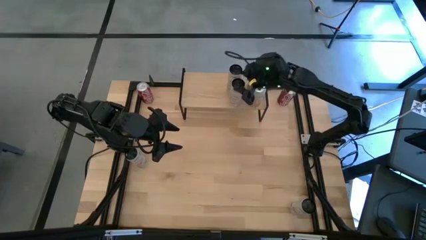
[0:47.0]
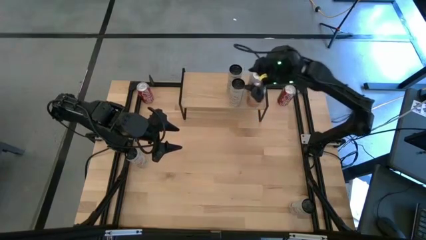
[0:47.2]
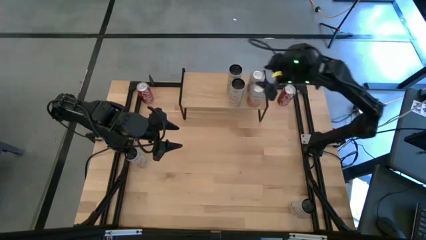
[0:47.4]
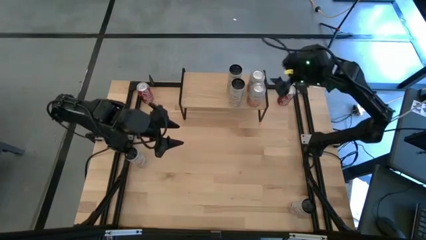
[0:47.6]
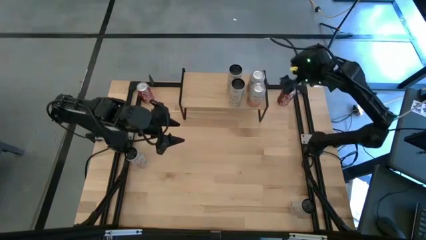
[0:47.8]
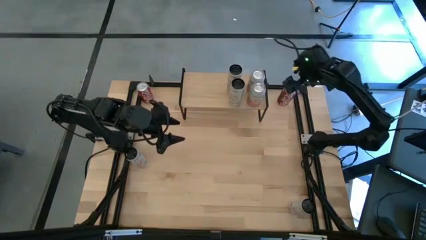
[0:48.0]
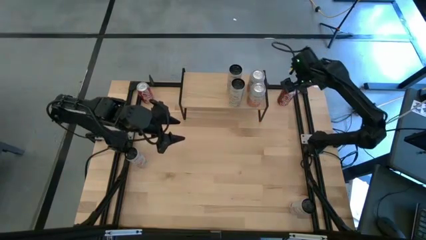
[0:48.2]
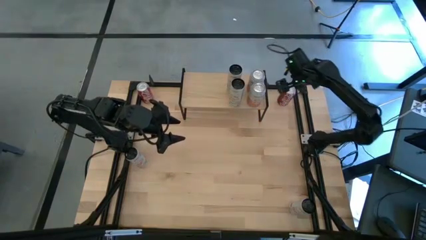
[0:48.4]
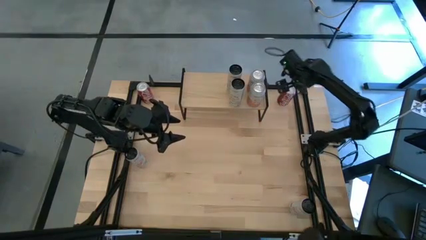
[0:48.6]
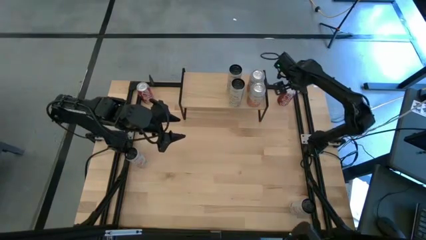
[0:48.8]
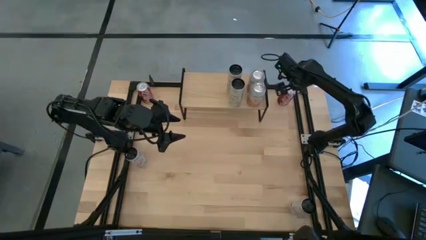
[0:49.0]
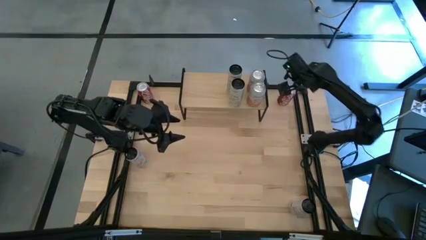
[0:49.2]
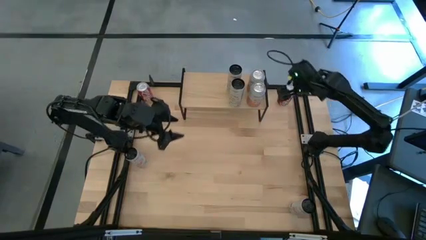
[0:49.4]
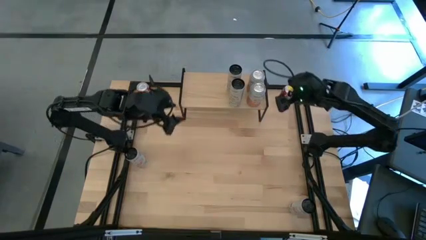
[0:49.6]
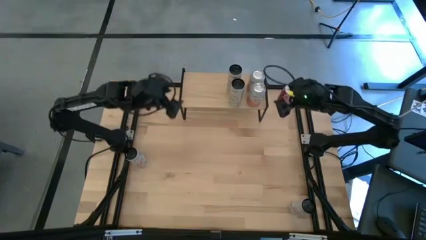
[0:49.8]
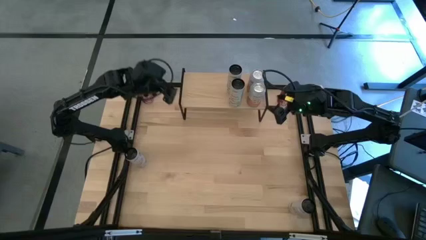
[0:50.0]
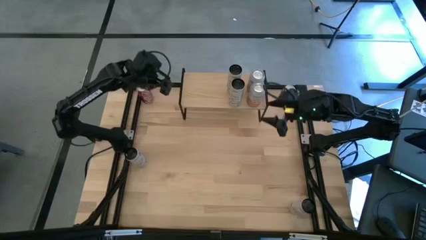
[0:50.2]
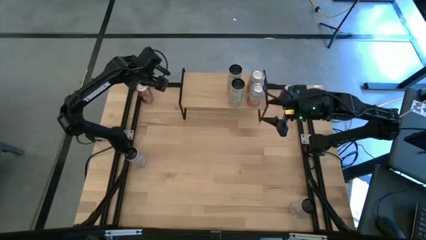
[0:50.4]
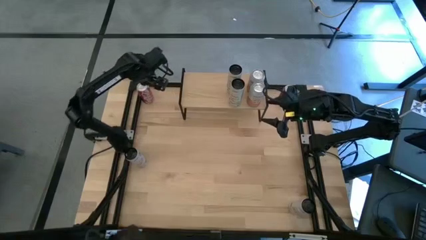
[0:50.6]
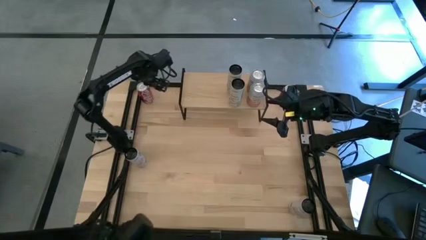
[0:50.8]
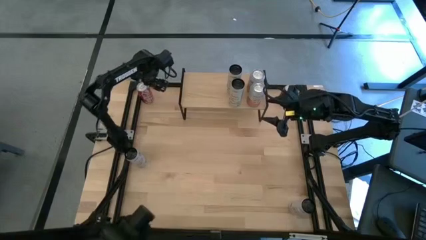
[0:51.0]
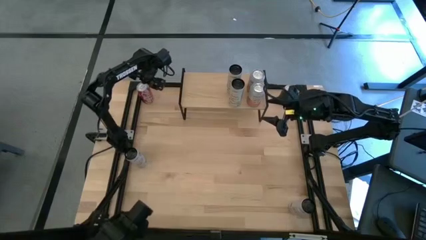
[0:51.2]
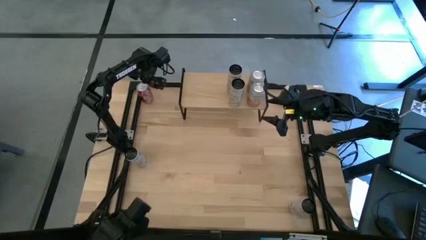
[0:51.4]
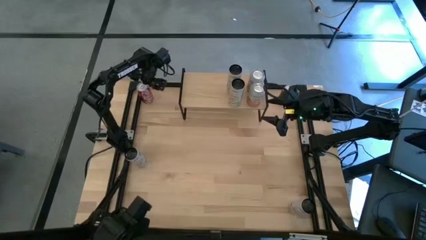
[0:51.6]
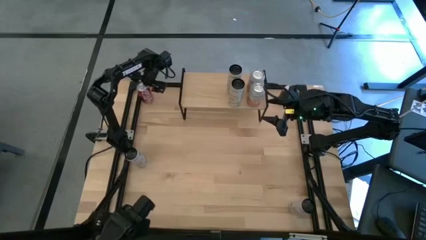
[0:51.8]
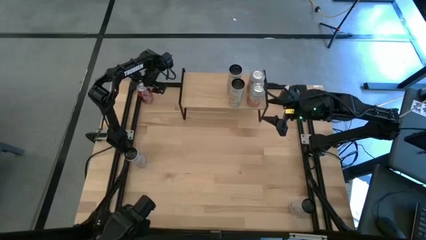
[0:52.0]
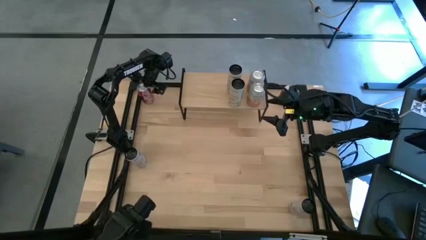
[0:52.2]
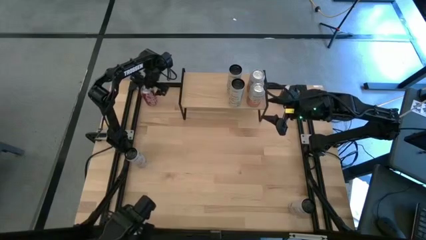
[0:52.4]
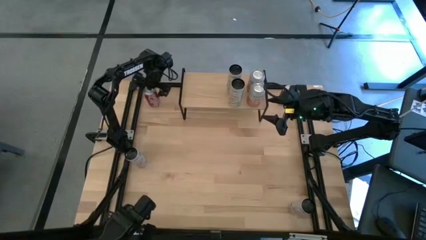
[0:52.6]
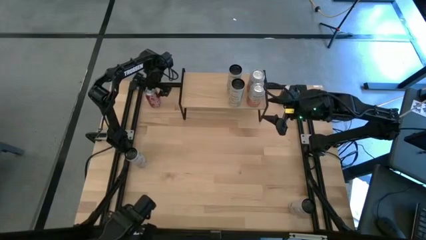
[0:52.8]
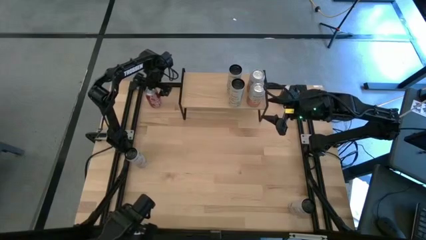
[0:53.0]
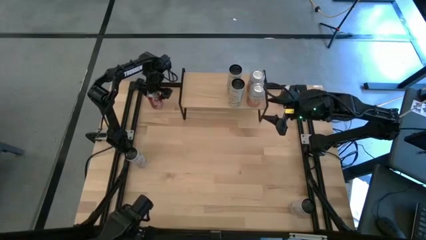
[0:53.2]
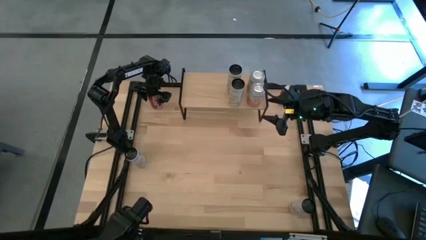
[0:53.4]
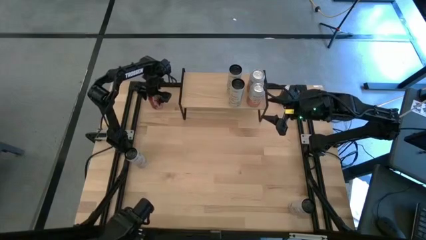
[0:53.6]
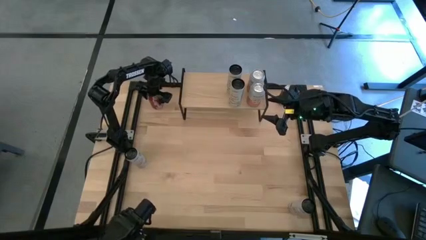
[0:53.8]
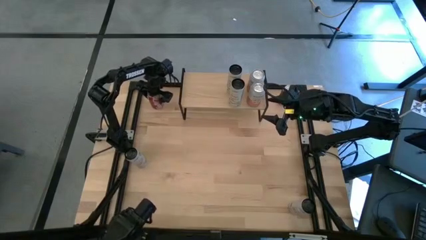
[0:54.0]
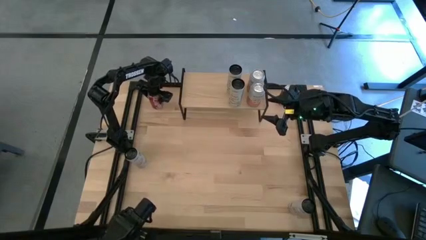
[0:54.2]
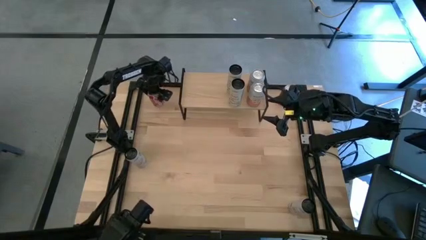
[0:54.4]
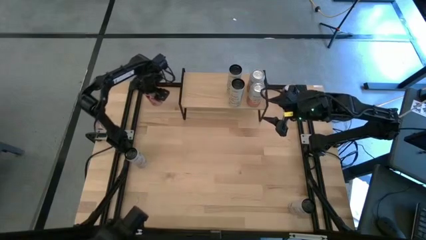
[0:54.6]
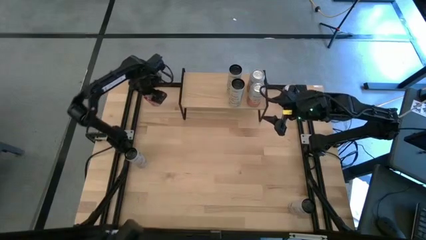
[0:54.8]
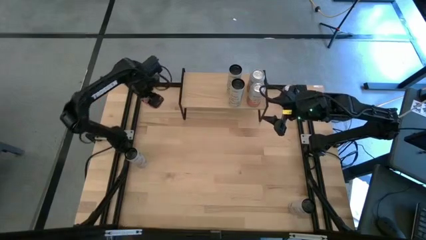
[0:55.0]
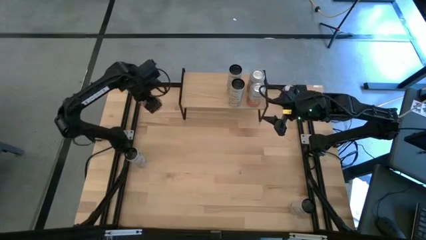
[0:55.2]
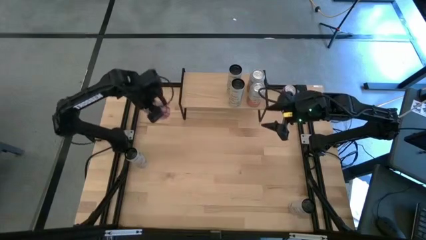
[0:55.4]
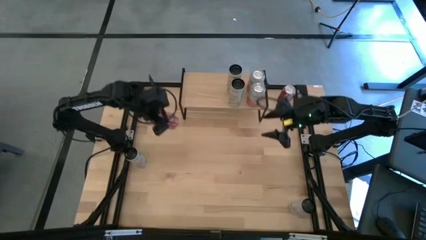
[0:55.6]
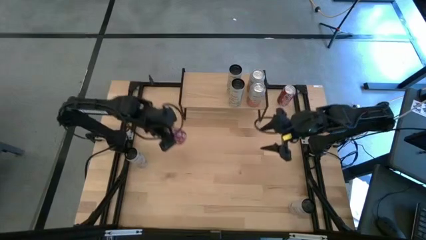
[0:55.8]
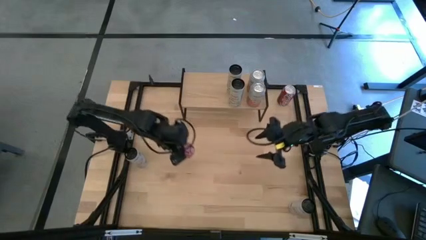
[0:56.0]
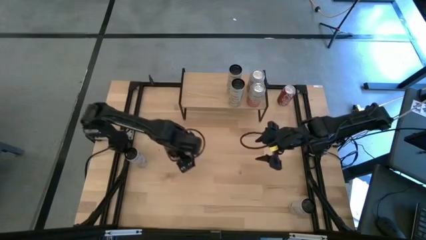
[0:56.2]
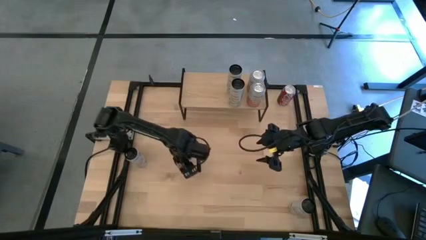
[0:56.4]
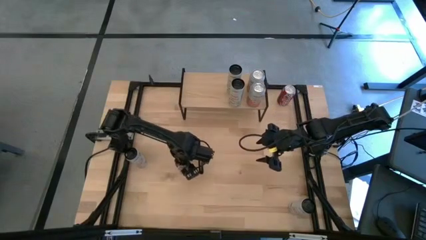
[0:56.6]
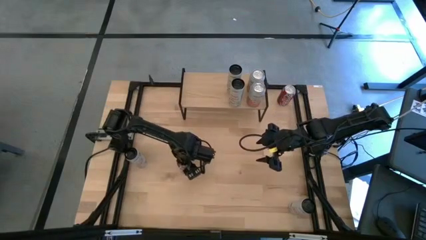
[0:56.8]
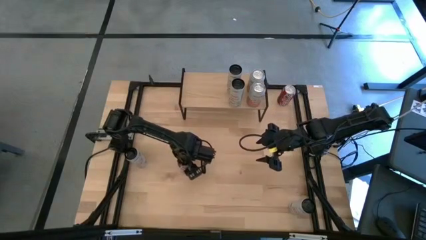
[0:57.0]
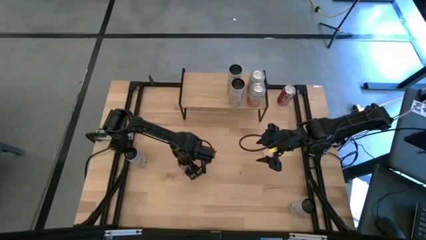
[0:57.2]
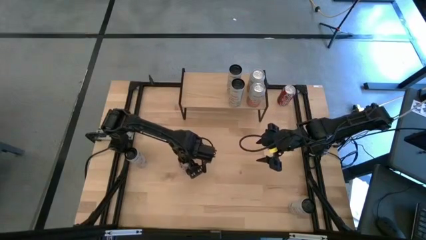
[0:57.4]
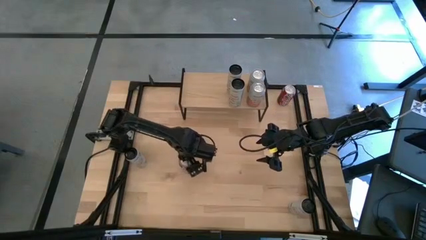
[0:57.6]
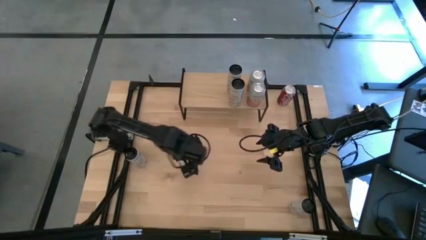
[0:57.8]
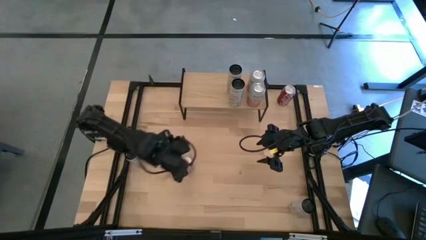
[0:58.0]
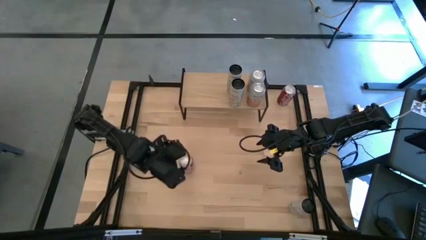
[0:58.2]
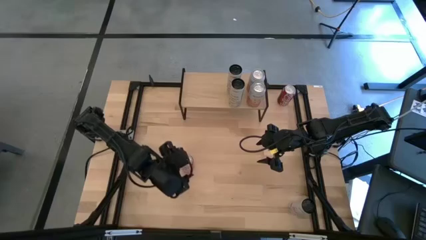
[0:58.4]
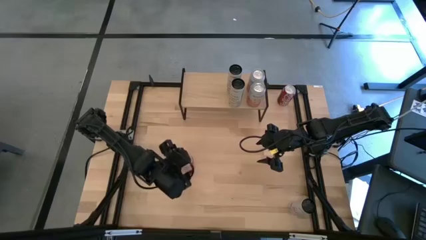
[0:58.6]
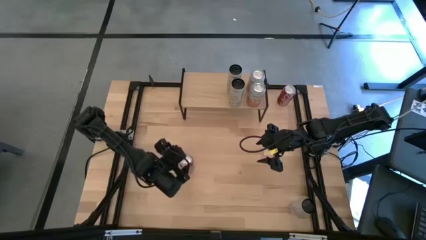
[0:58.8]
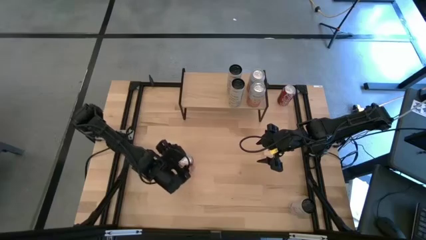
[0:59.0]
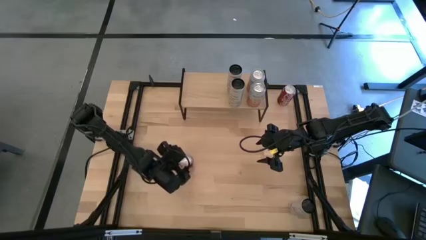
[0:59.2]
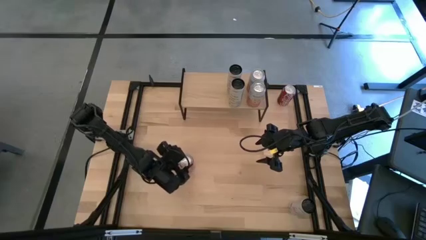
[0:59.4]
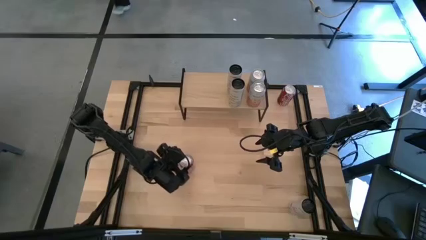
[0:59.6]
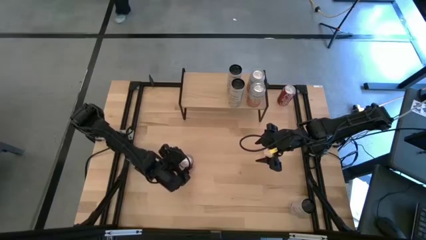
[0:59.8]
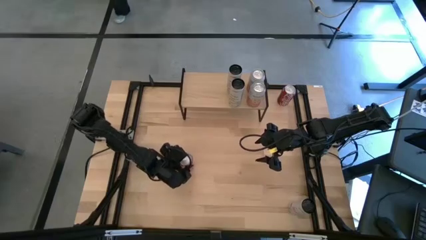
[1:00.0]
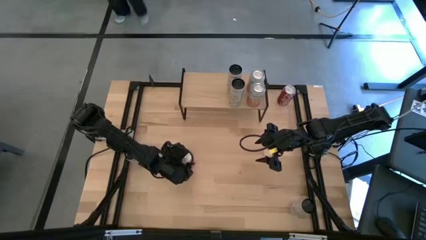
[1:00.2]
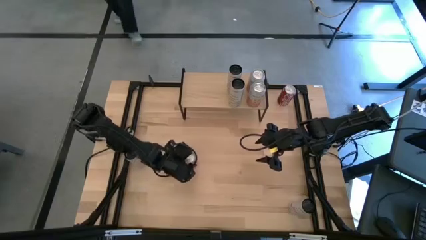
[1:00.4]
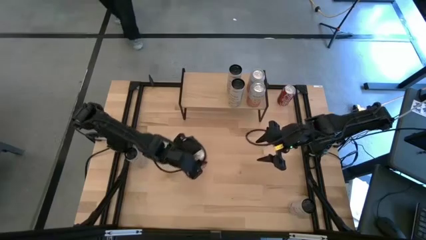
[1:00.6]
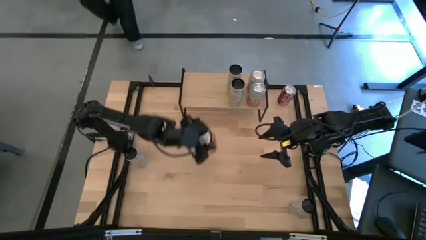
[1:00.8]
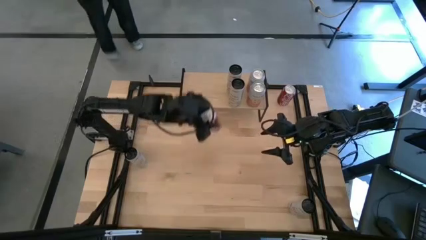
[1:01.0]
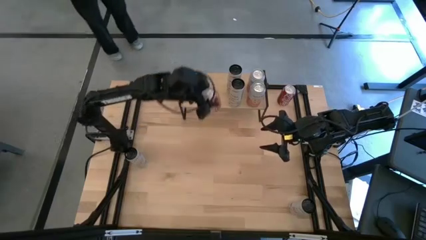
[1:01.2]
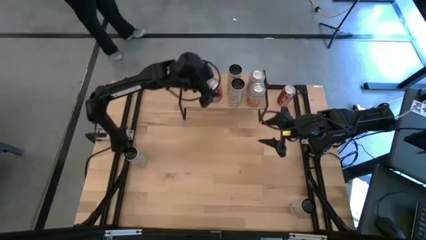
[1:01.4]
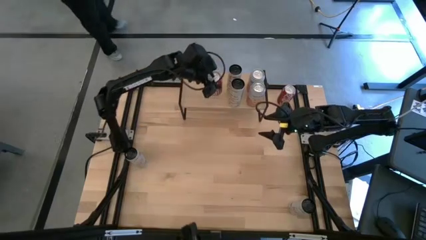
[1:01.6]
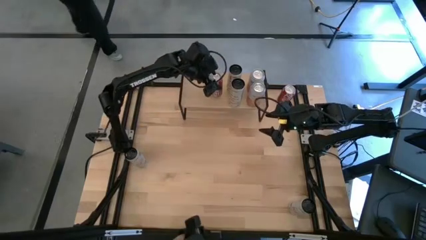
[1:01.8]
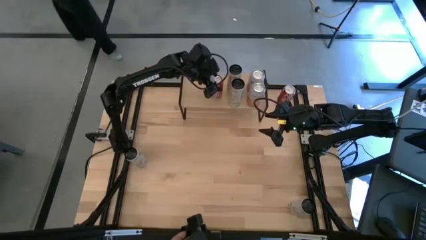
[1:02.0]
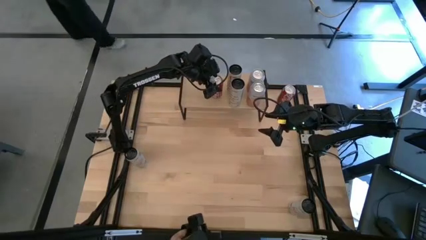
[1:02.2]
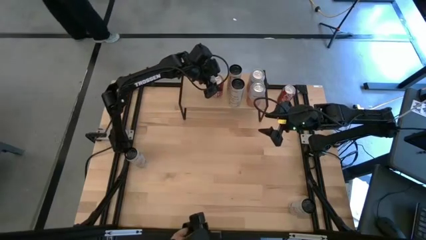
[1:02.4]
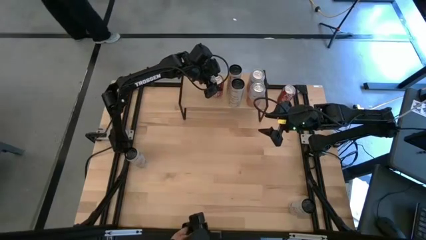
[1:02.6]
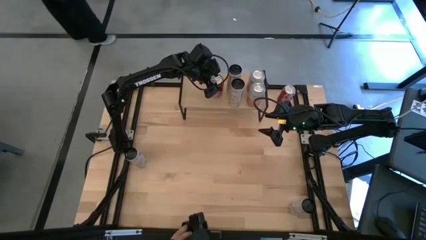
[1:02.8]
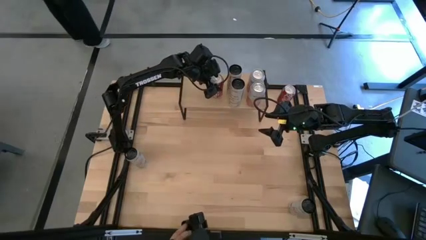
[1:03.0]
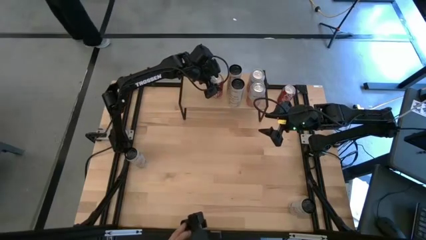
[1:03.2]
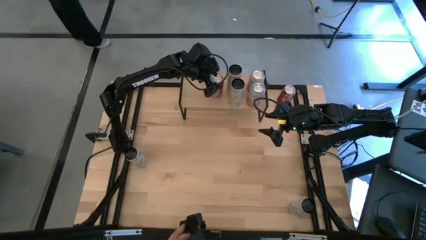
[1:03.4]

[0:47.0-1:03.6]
Task: Place canned beverage on shelf
Put the left red soda can on the shelf
